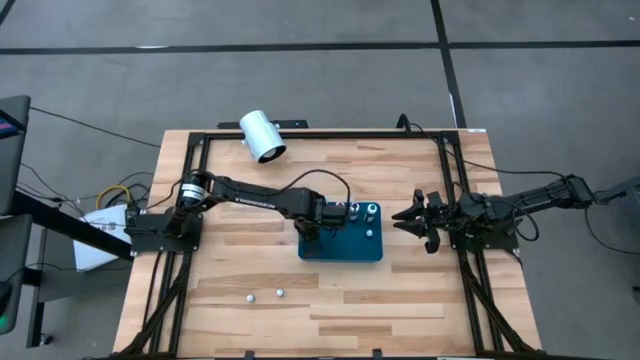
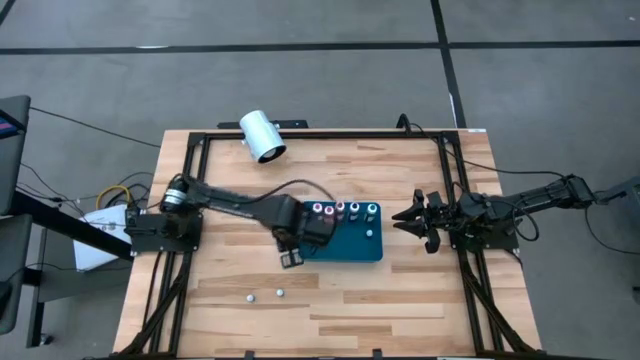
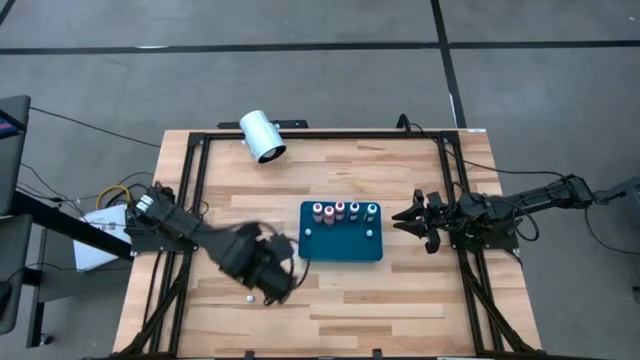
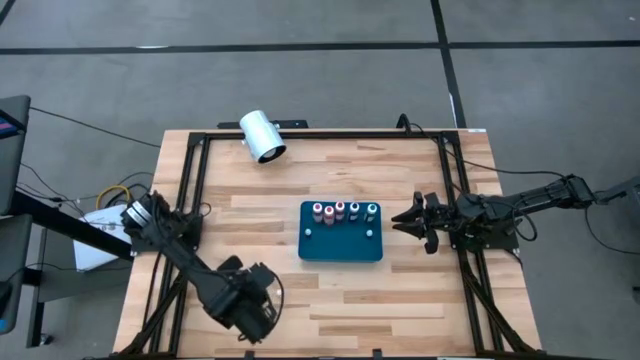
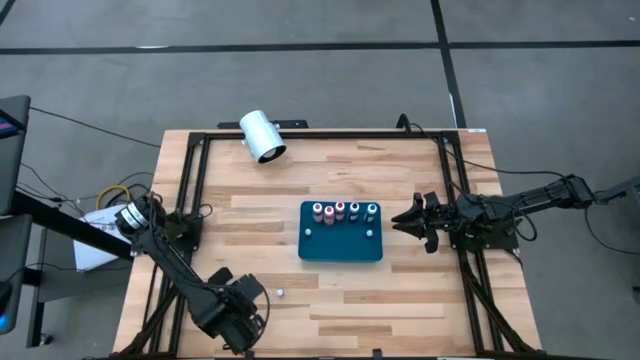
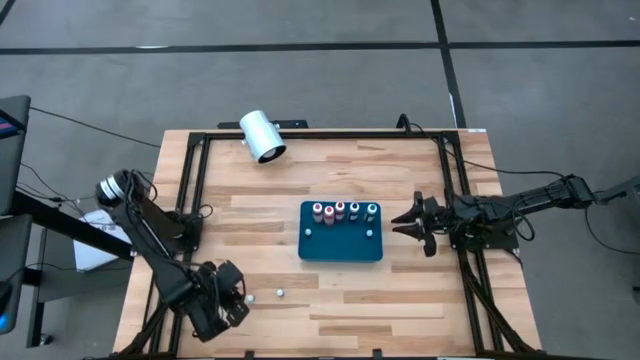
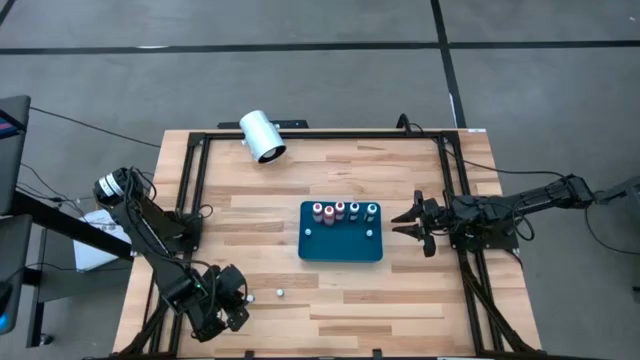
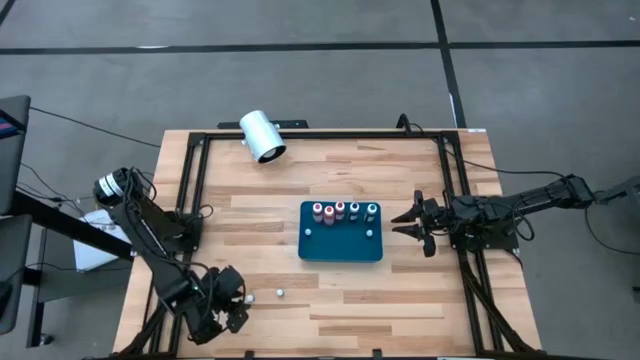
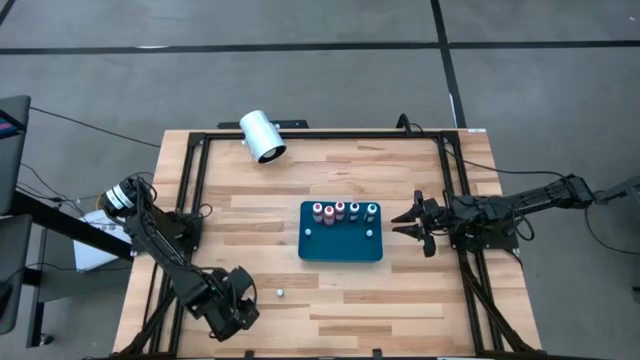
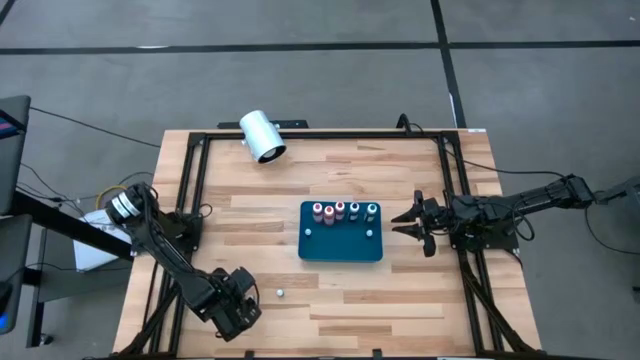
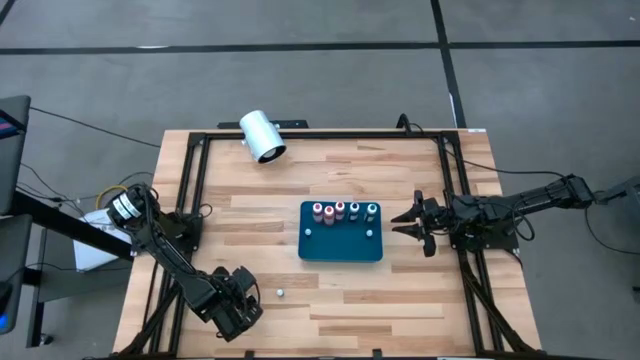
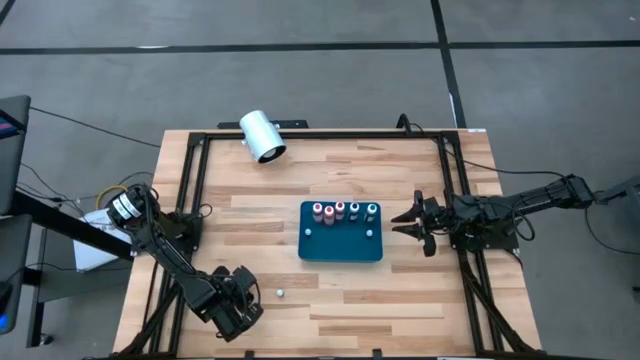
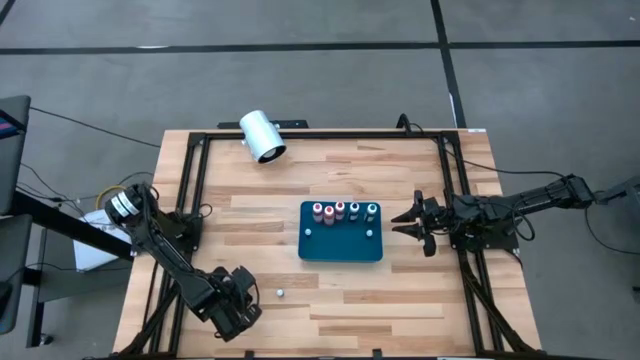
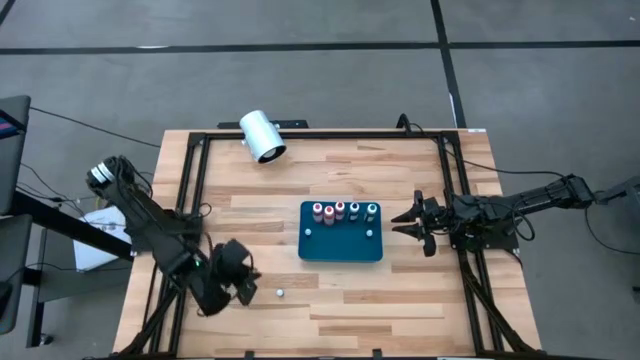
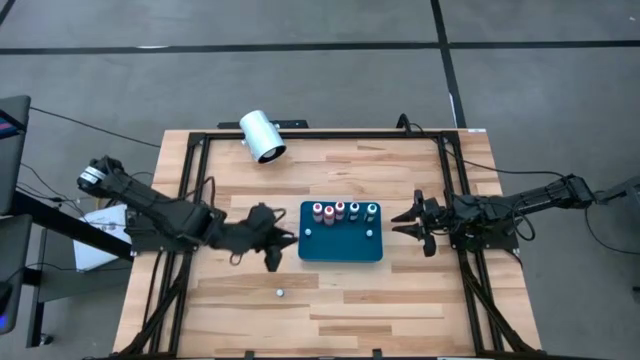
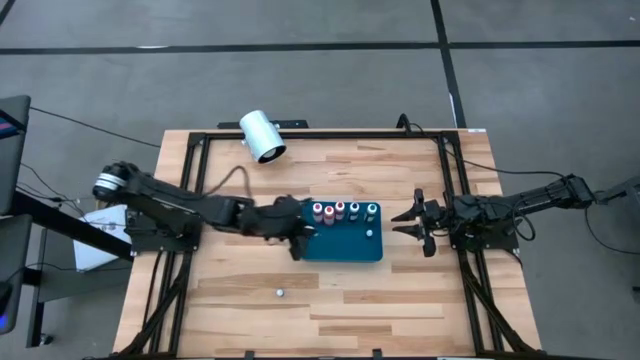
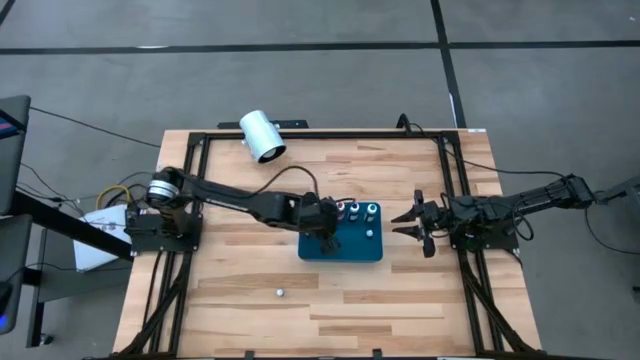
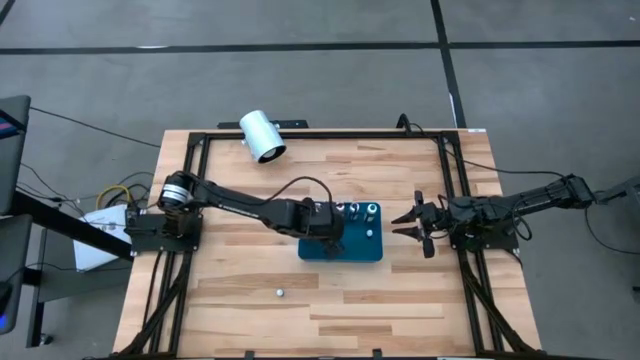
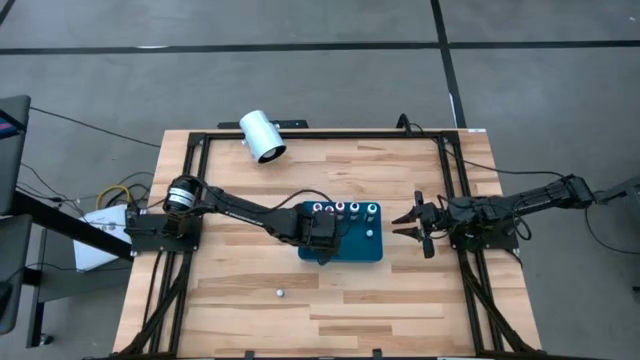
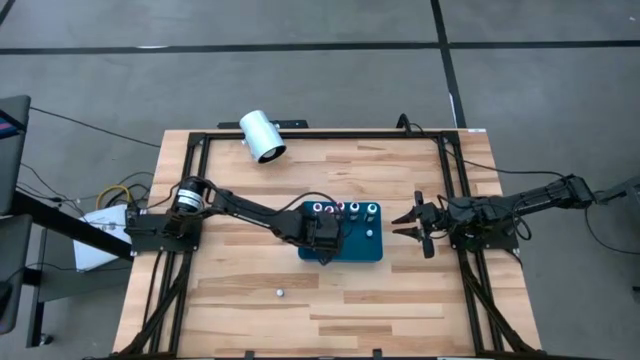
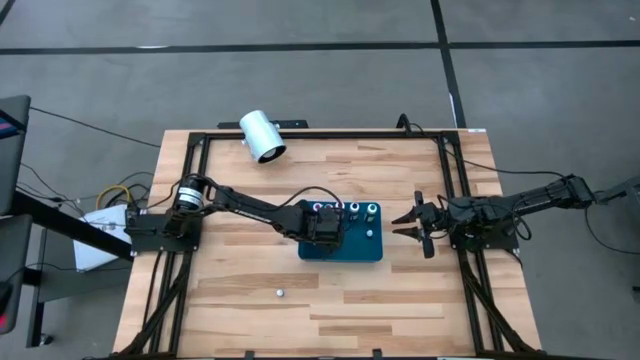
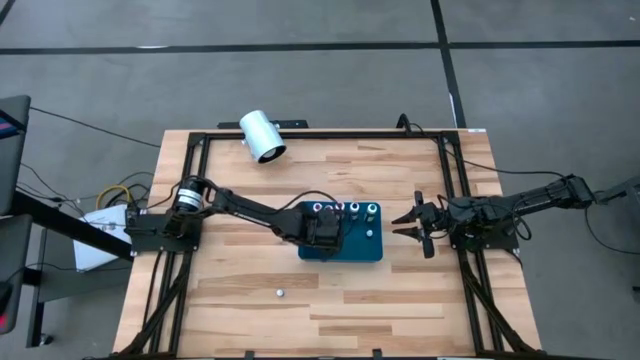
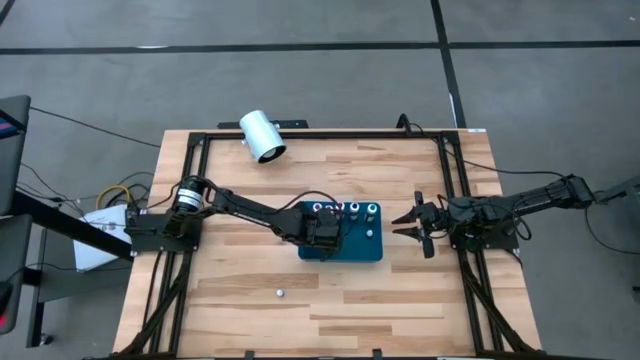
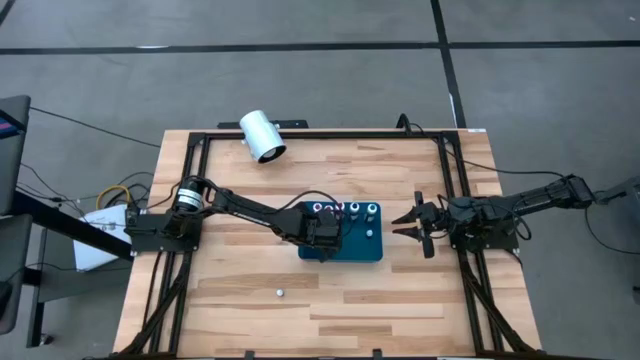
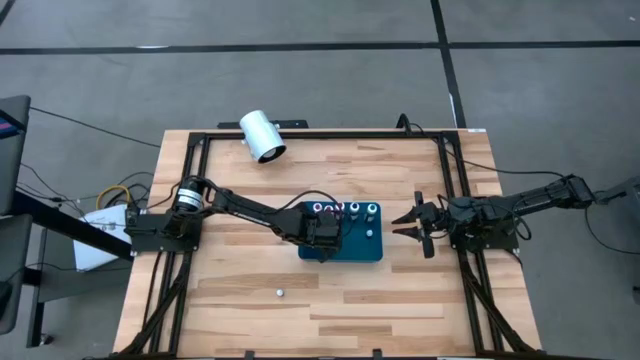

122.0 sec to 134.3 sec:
Task: Pick & Place food coloring
Put the small blue food coloring bottle into the blue bin

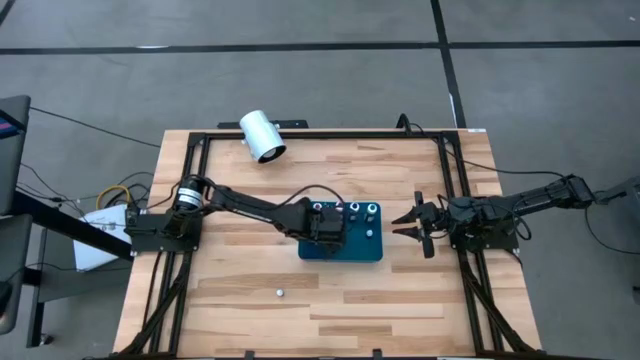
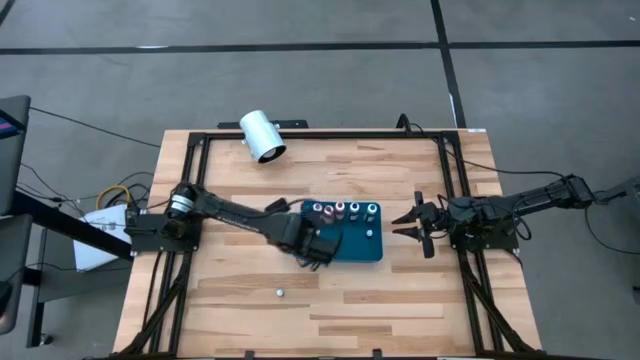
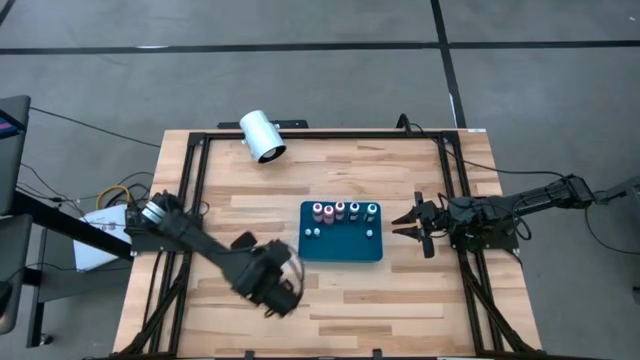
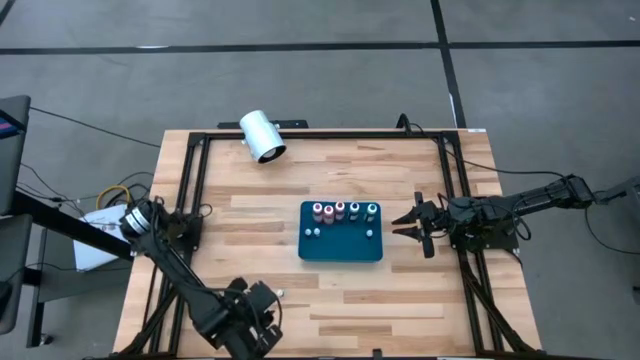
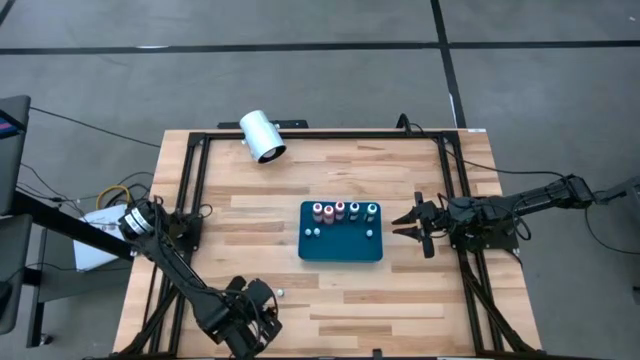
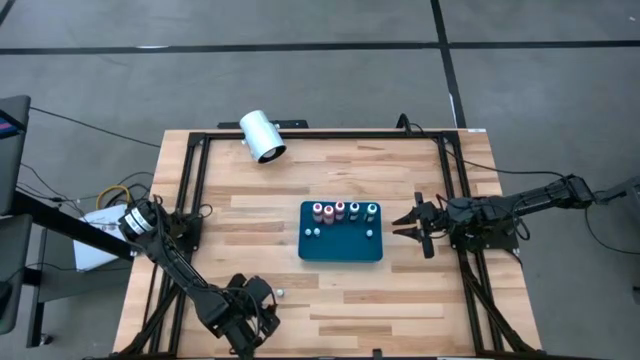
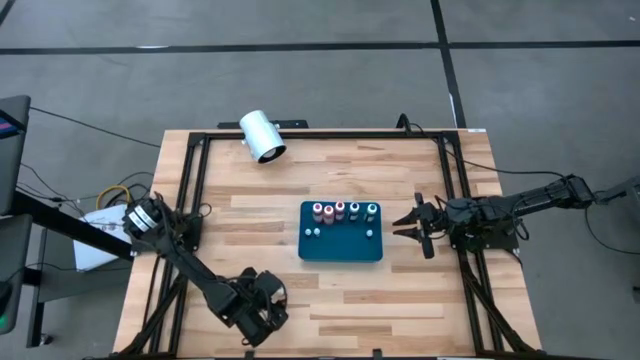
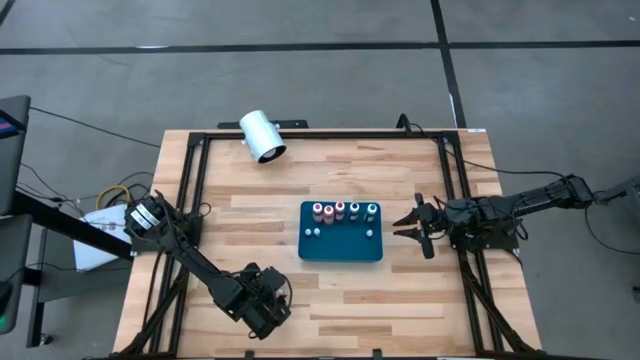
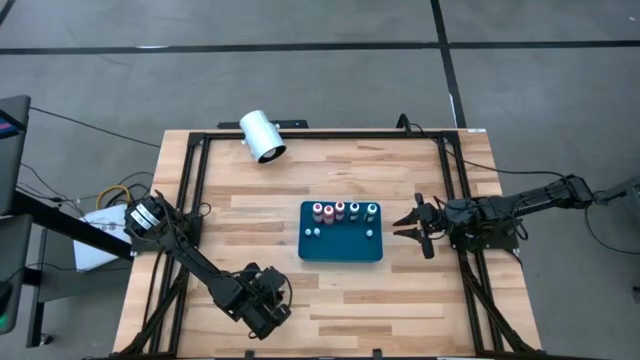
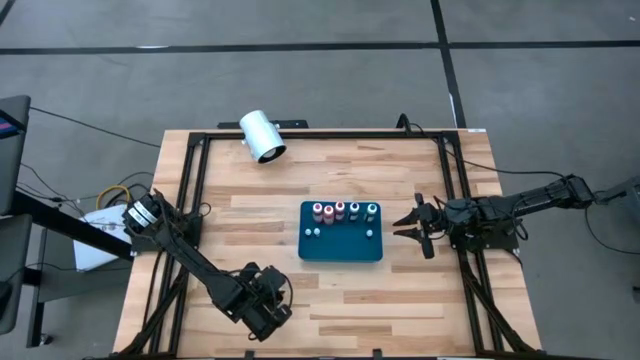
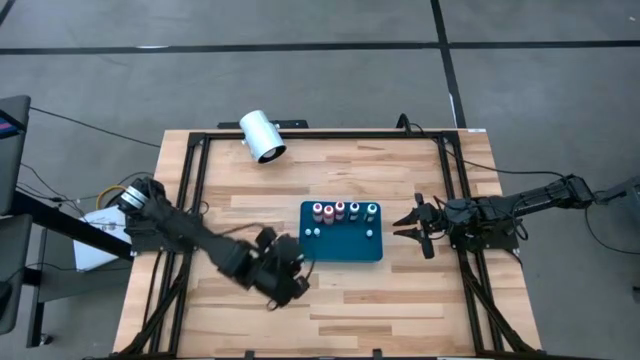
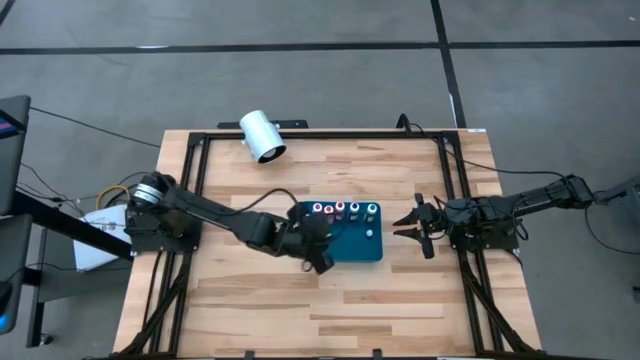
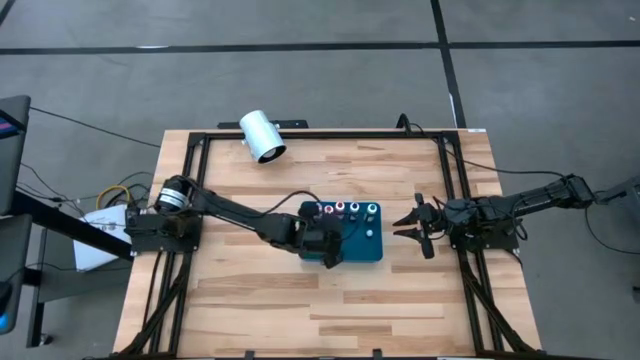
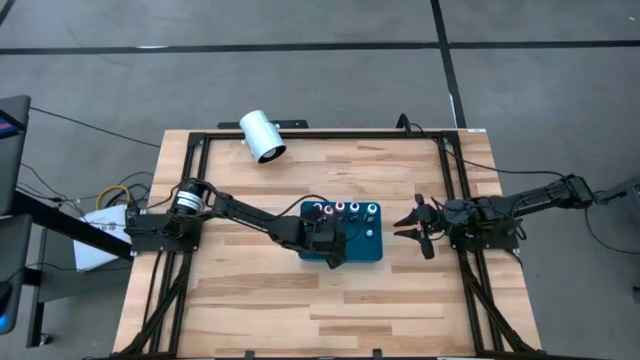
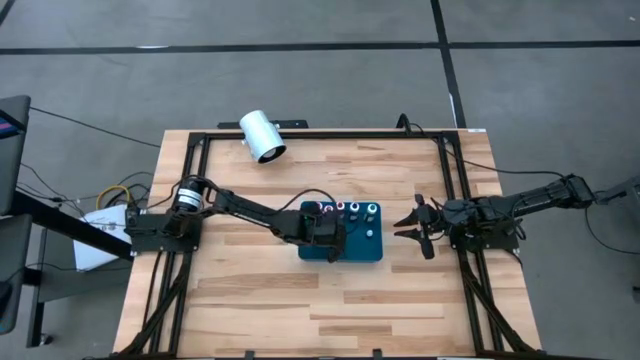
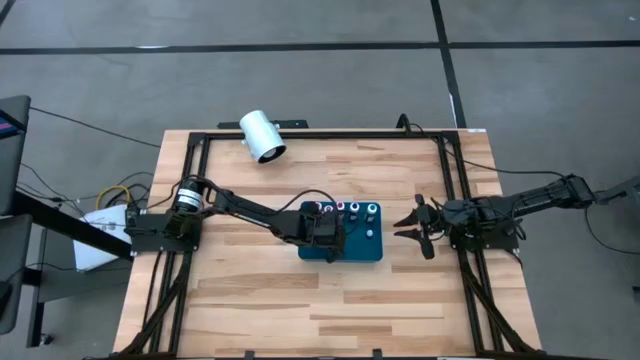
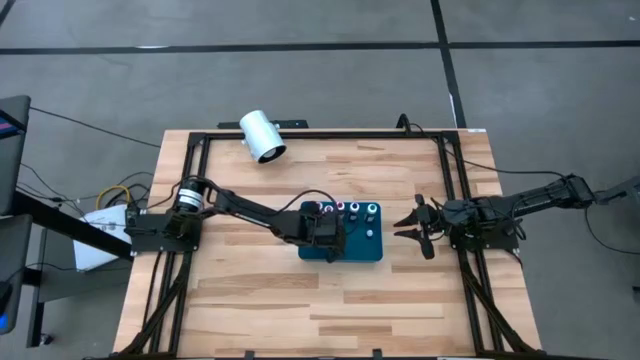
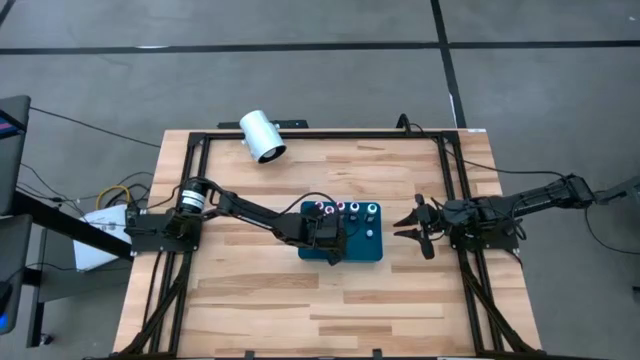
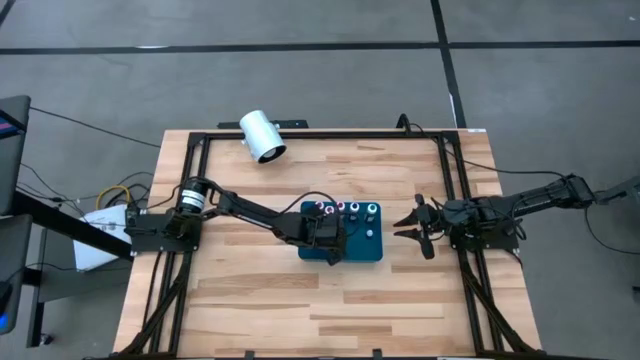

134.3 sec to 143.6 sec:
Put the small green food coloring bottle into the blue bin
